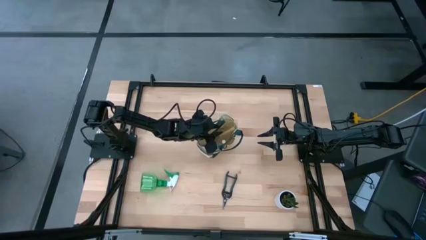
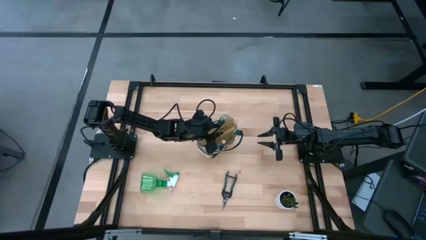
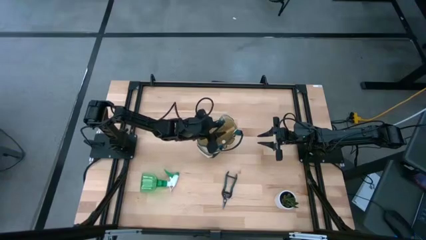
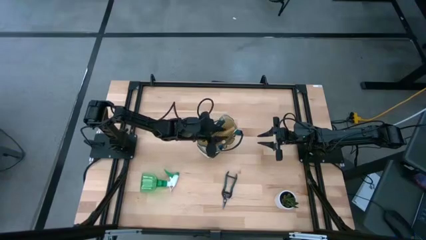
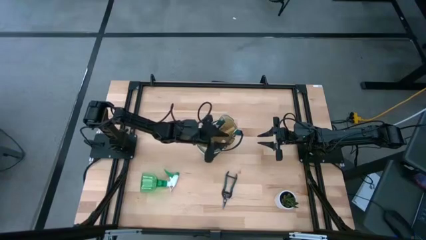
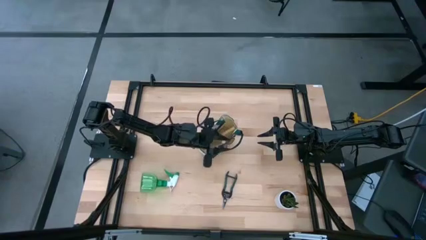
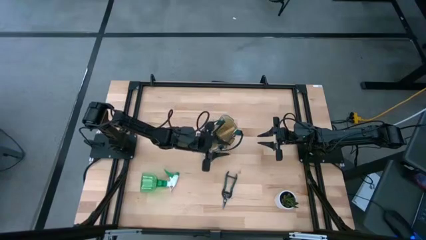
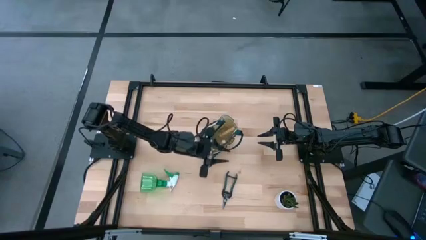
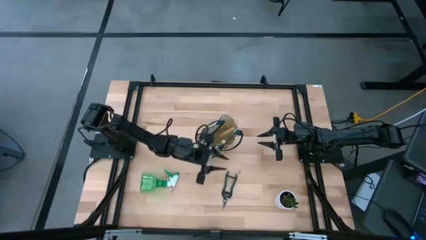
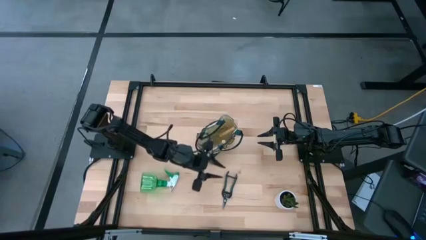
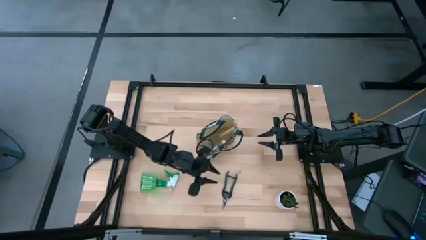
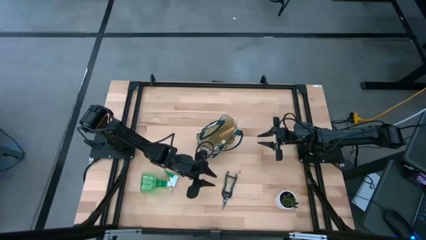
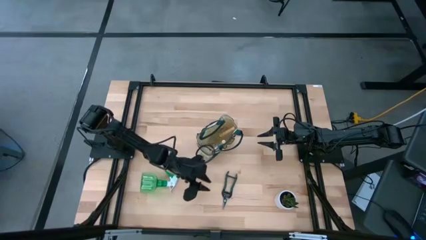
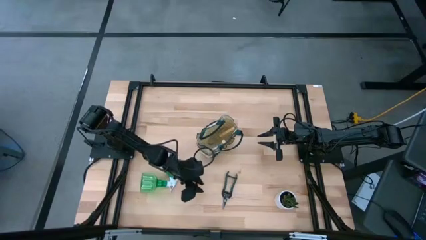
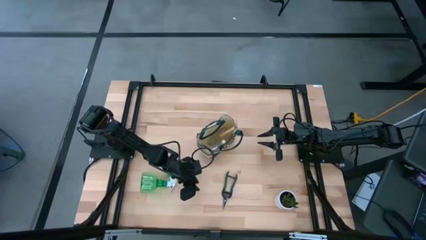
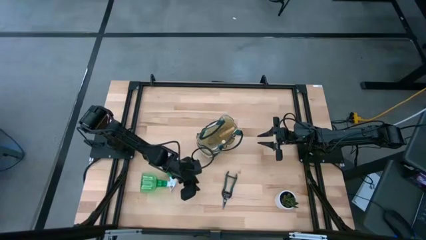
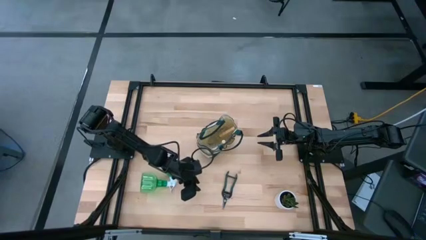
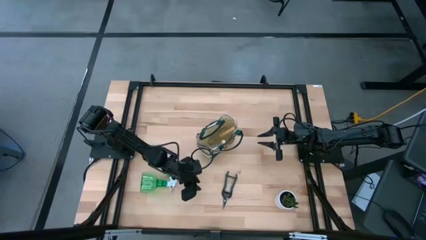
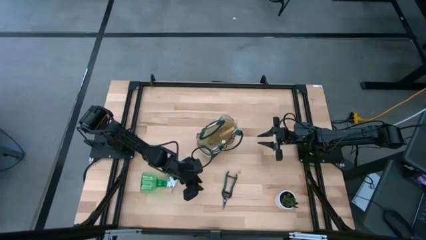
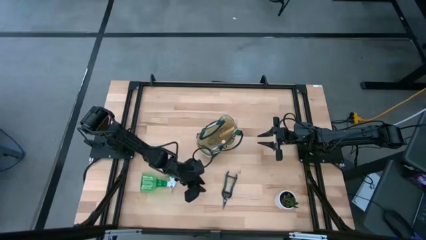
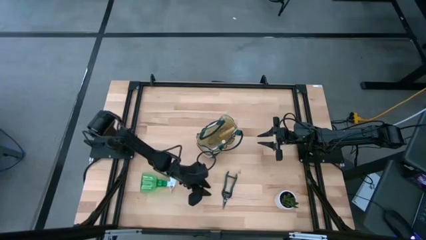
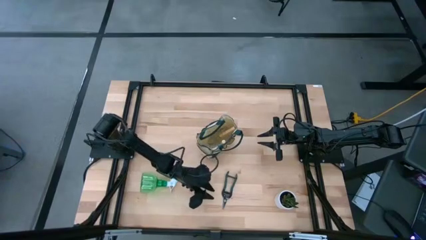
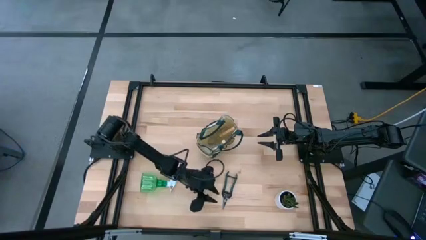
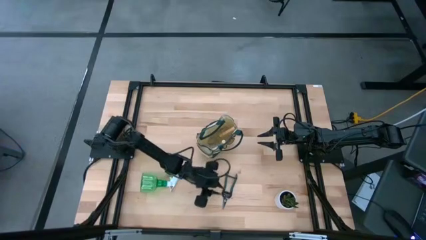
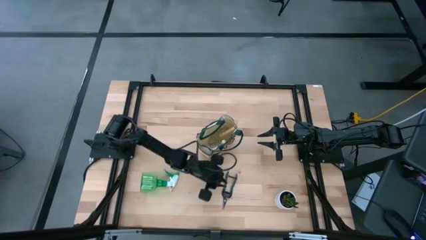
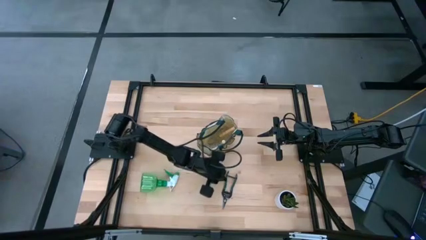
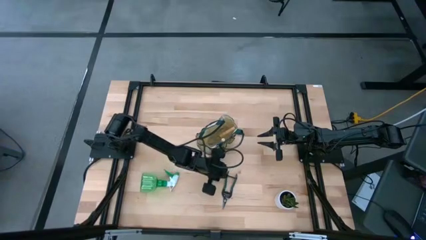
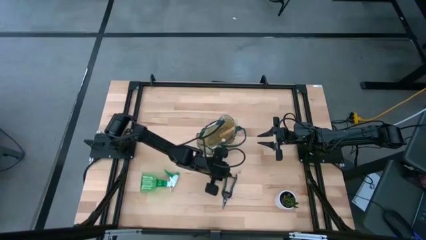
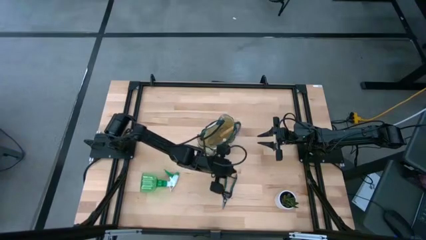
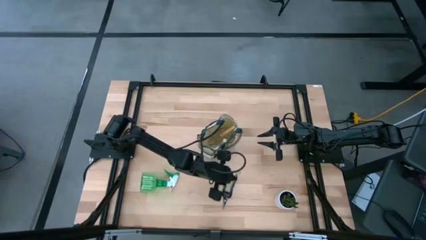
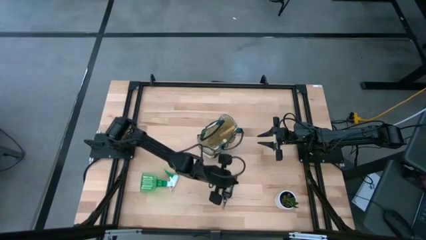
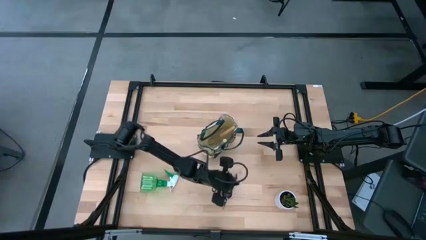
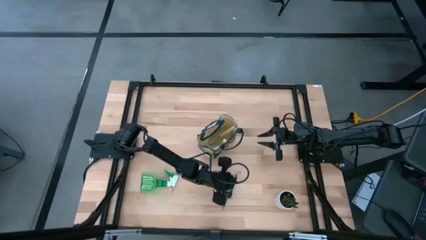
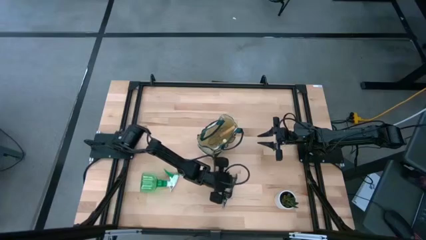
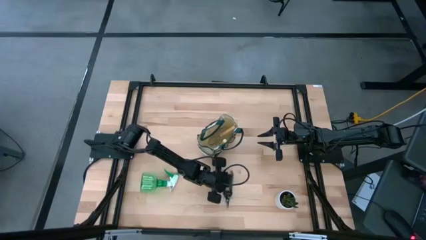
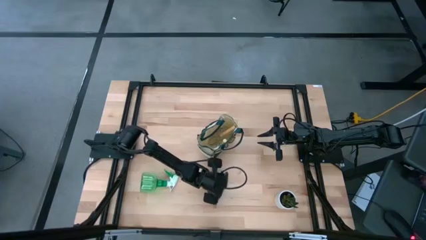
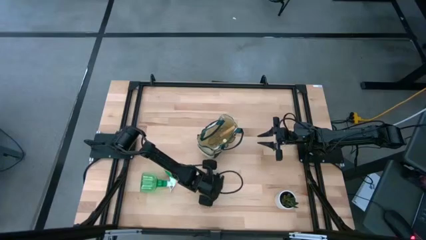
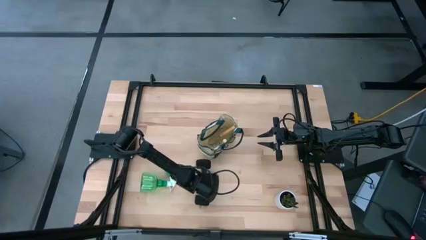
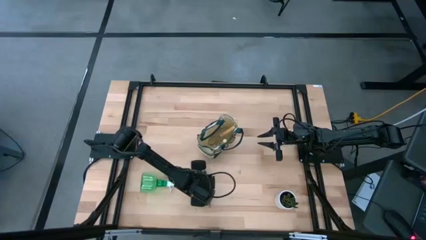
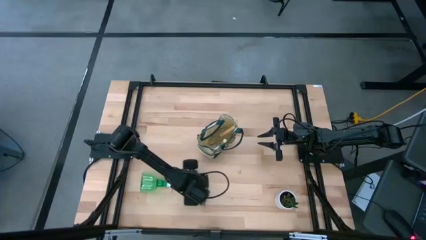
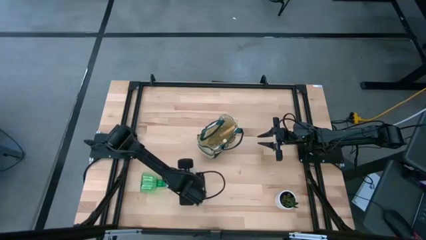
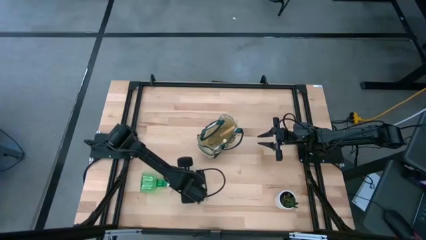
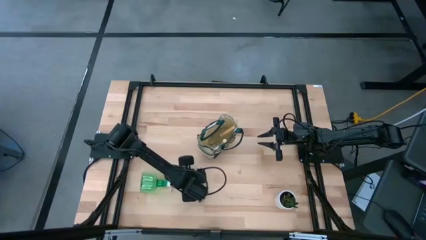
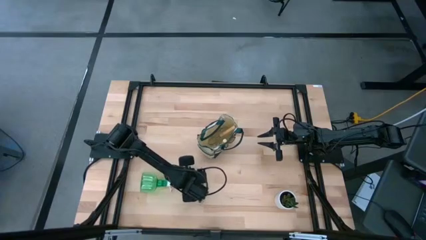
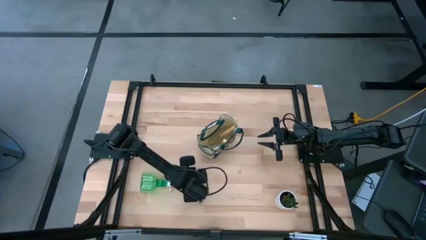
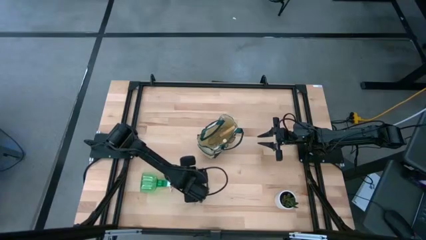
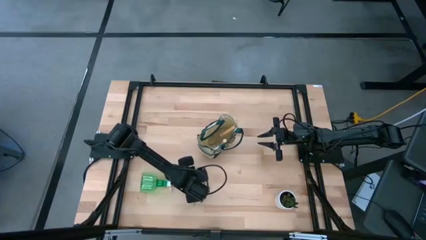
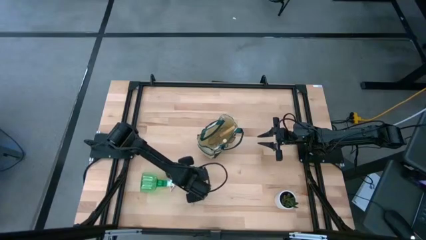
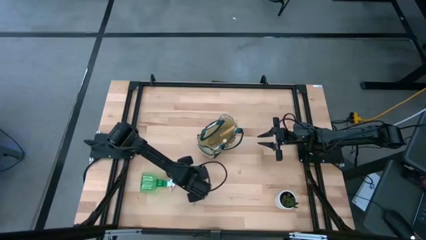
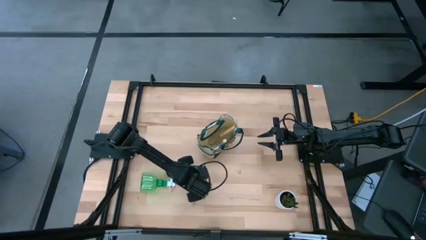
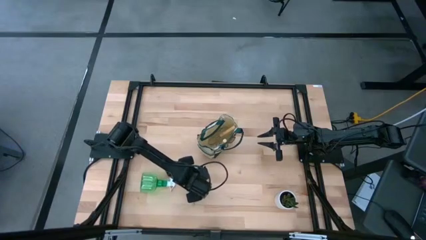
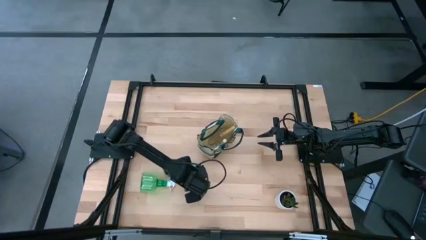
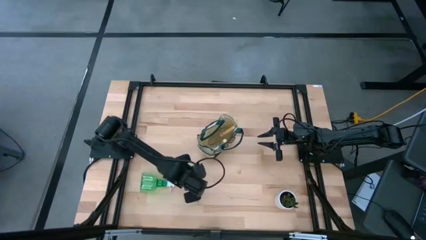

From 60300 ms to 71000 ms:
Task: Pick & Place Garden tools in Gardening bag
Put the shear scissors into the gardening bag

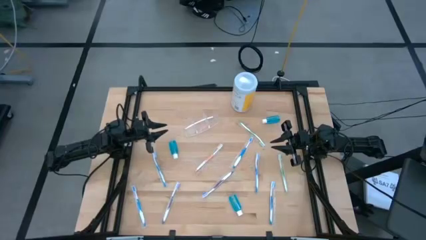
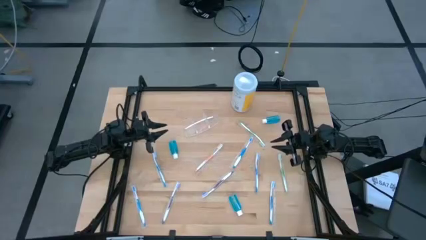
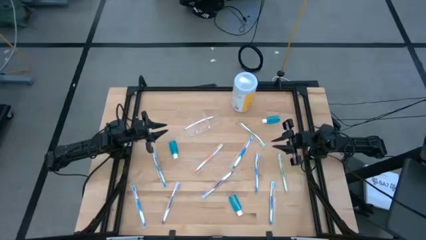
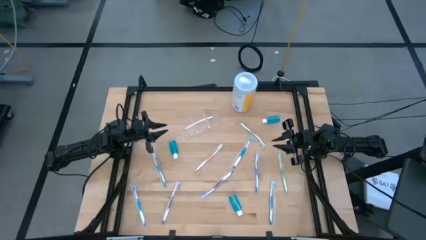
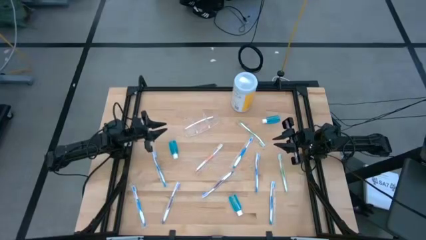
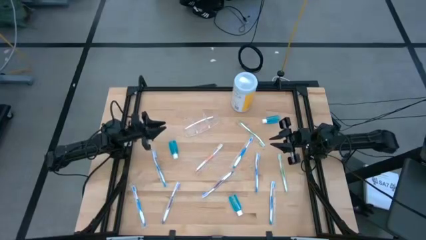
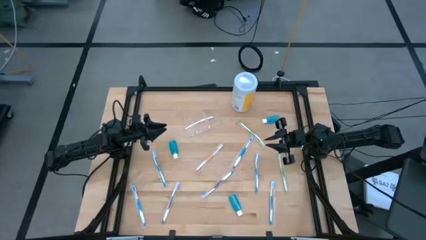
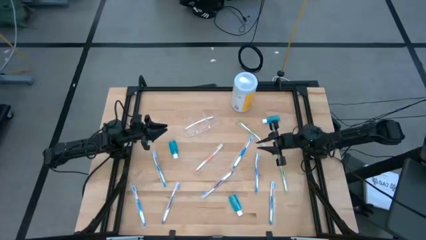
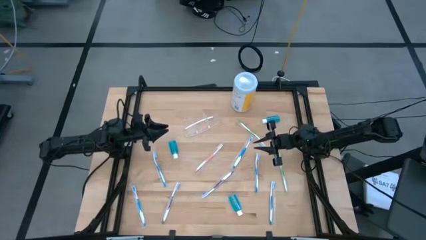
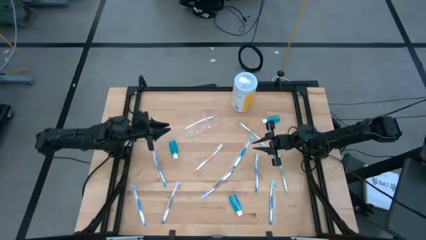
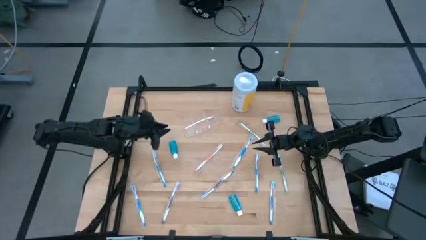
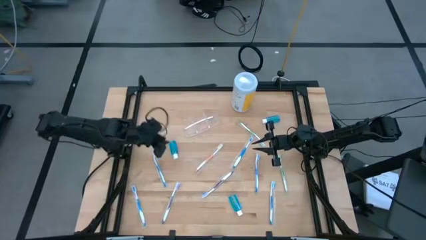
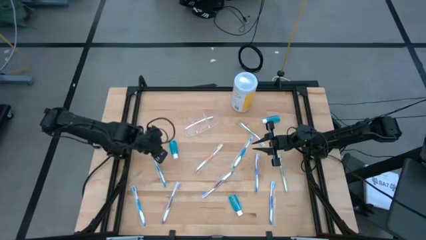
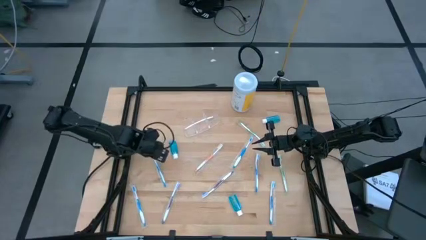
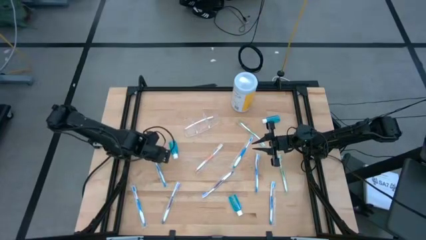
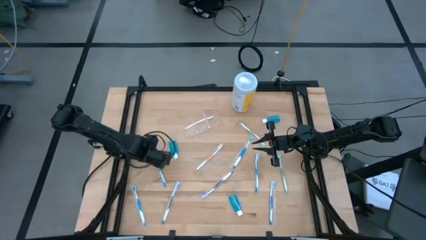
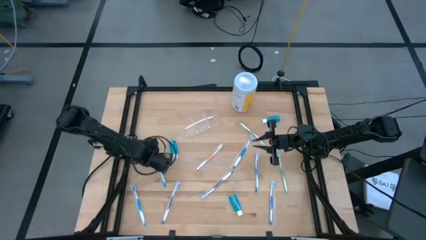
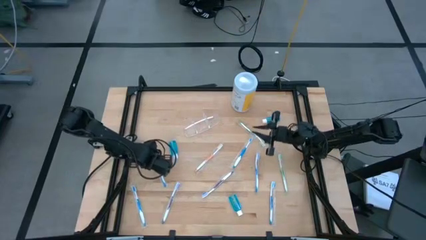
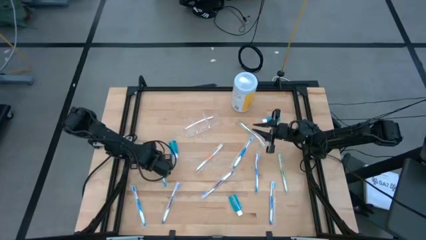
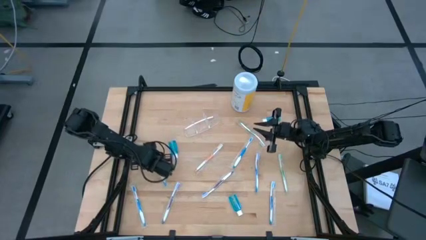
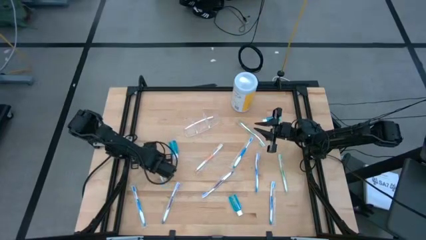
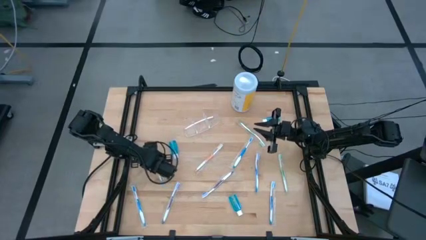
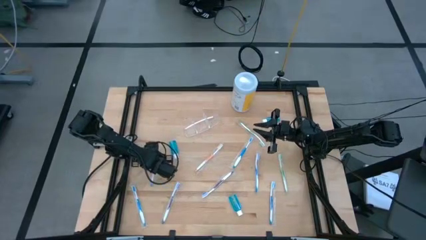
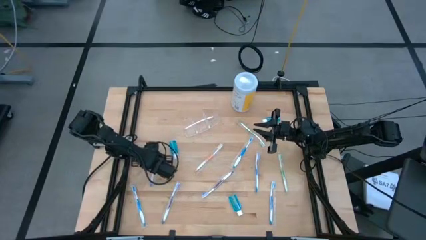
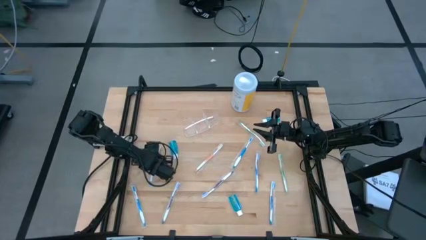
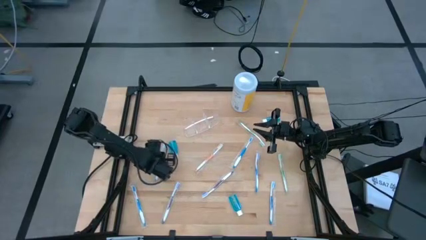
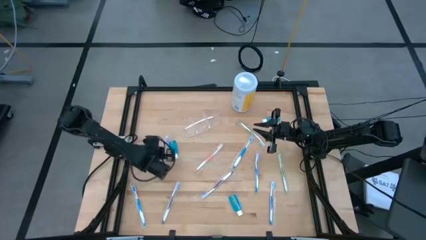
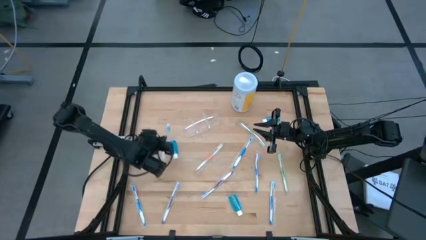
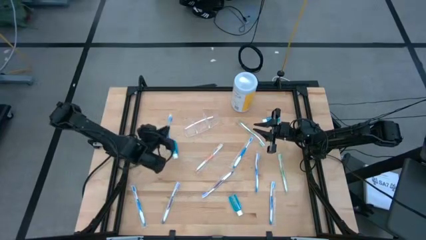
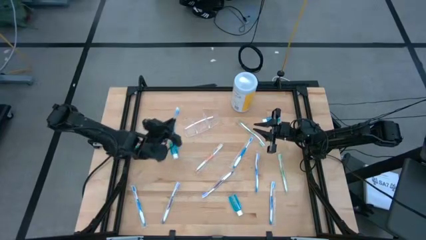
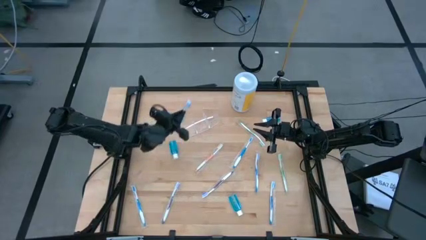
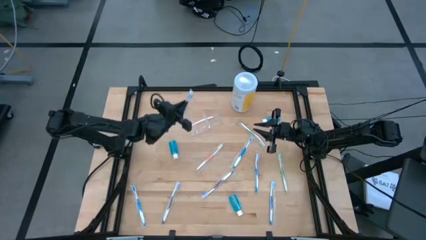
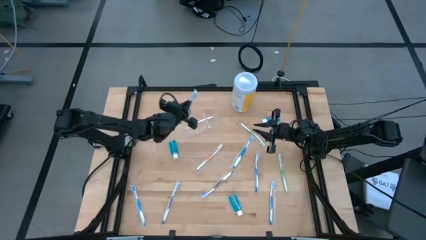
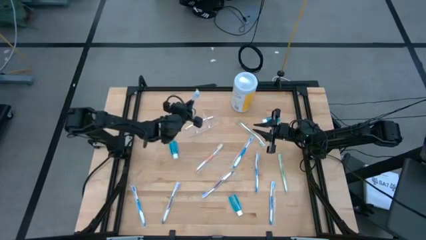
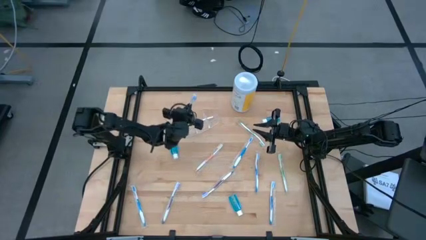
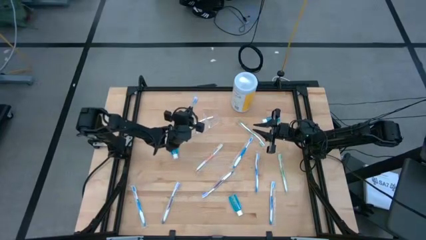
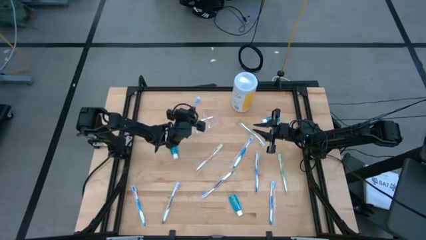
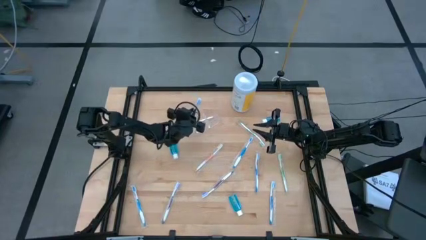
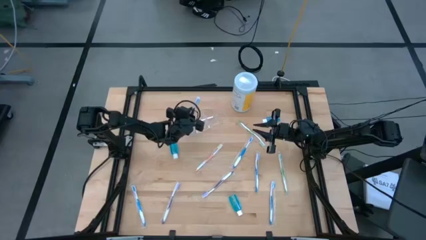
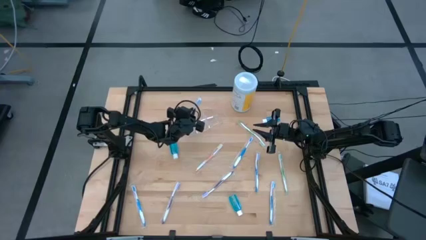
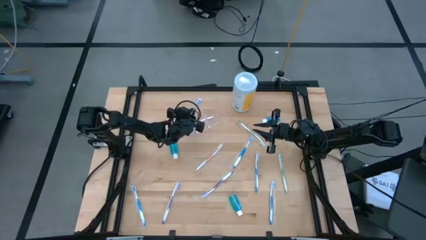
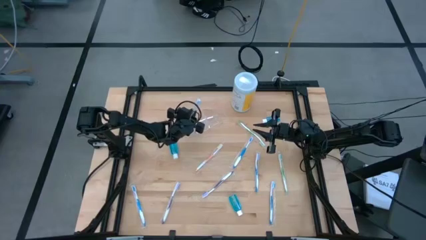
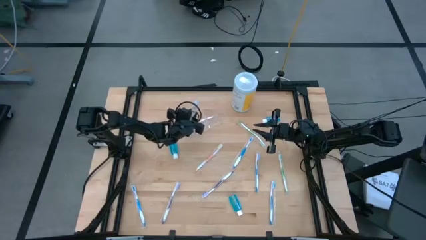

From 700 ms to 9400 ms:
Task: Pick & Place toothbrushing station
Put the blue toothbrush into the transparent organizer
